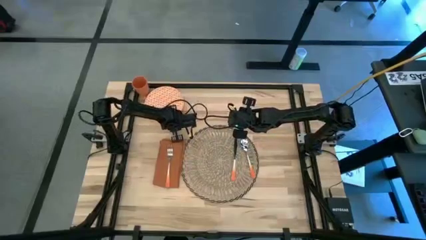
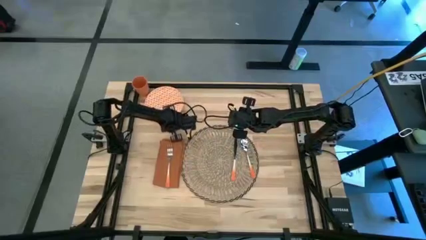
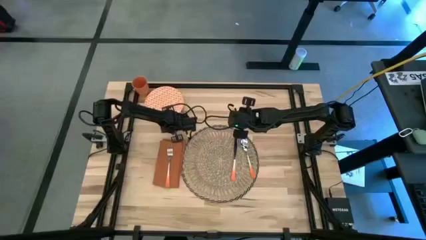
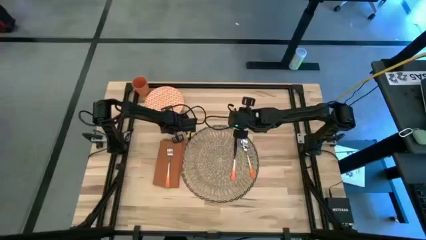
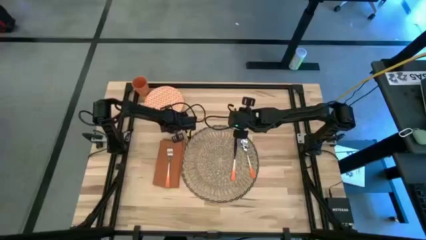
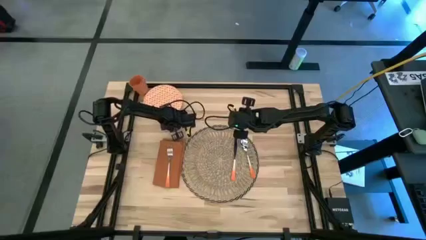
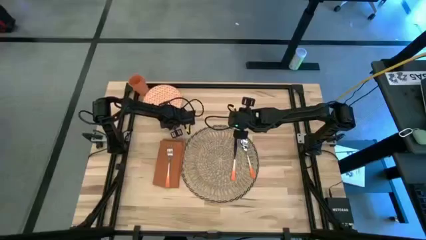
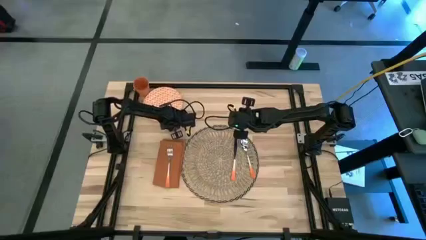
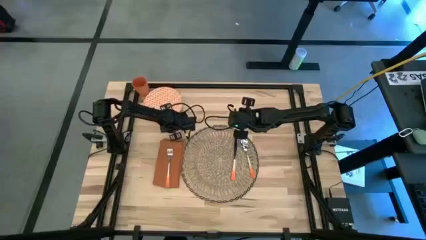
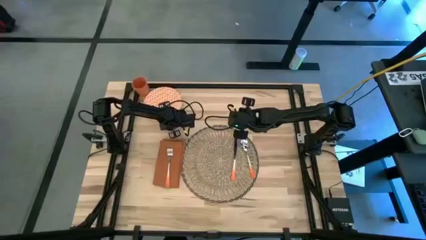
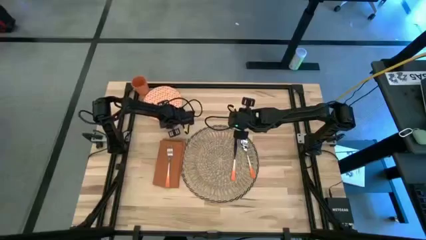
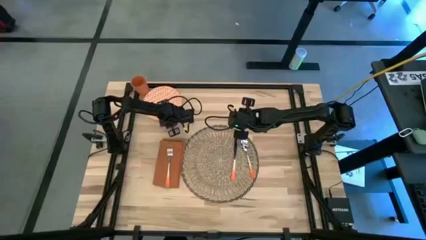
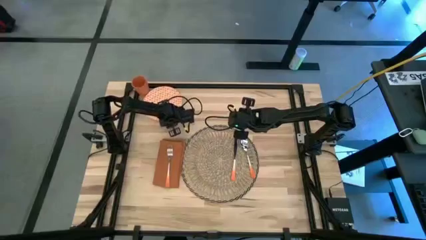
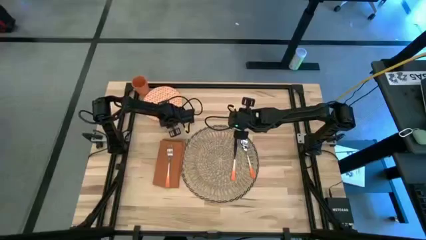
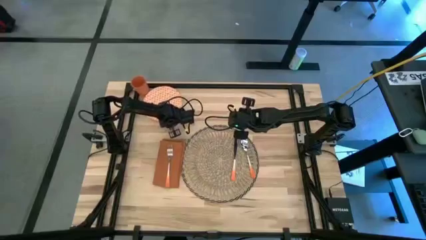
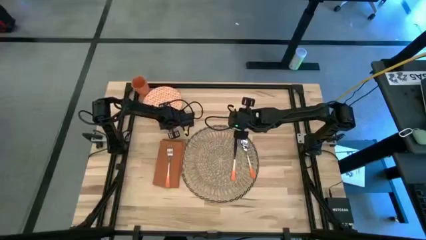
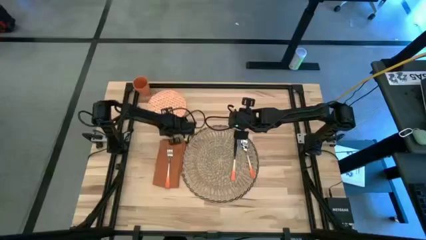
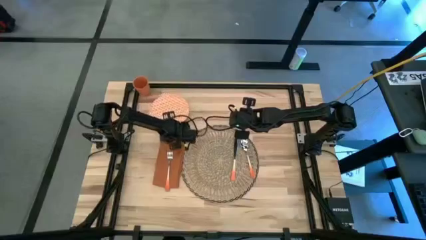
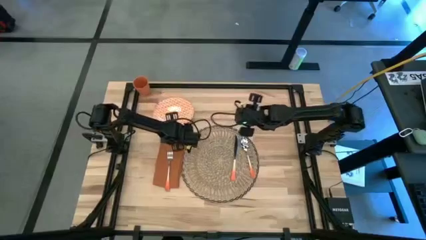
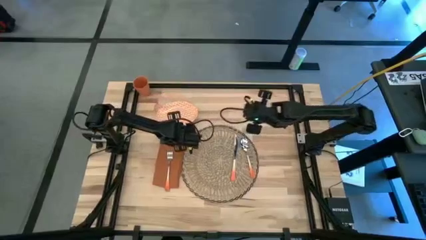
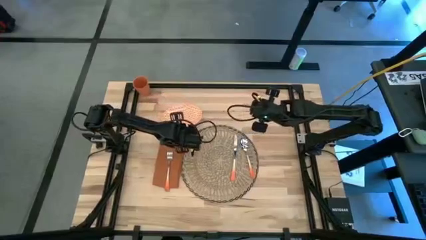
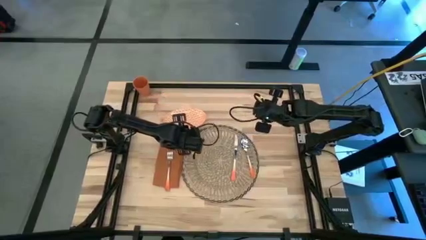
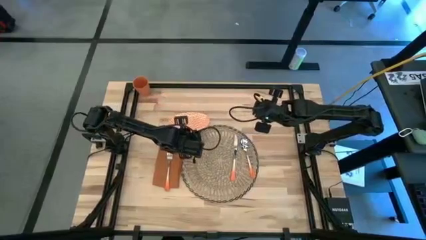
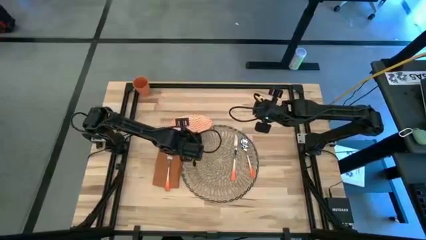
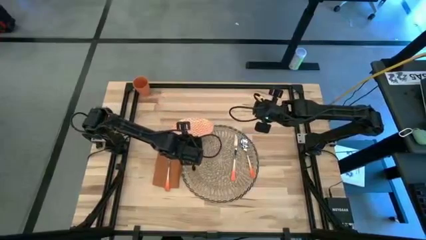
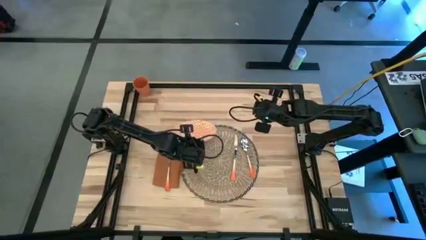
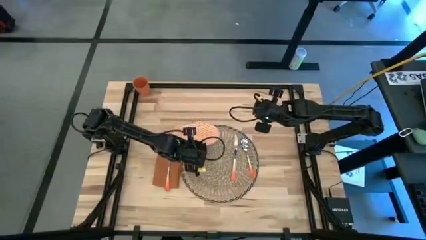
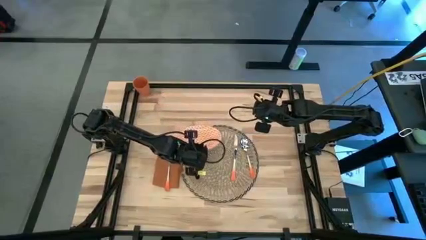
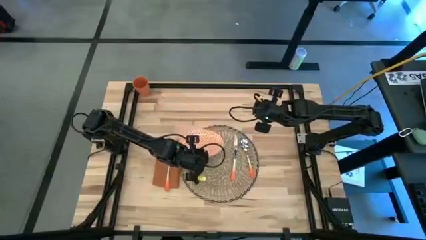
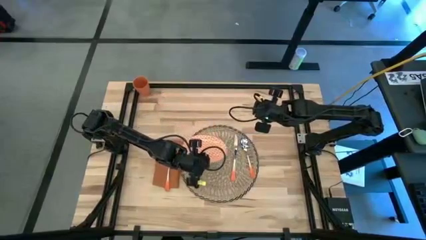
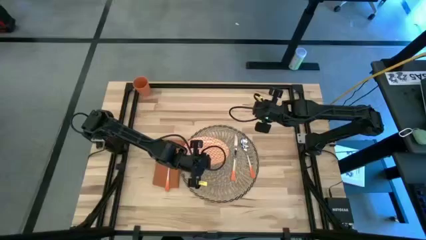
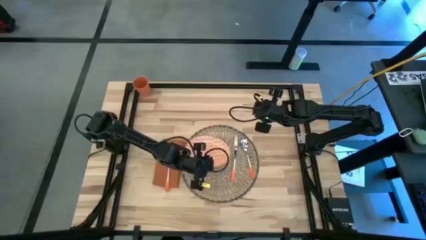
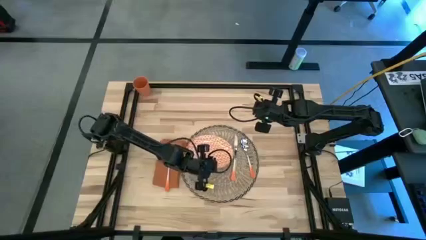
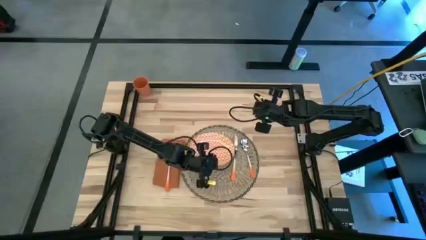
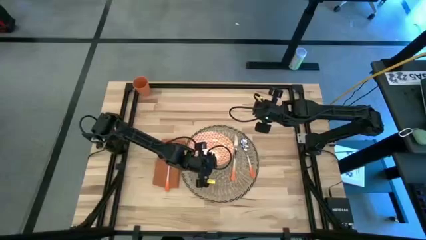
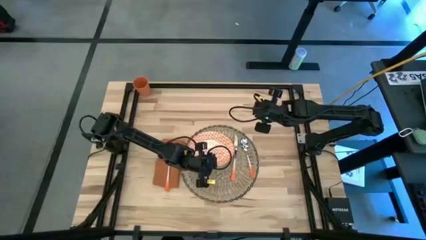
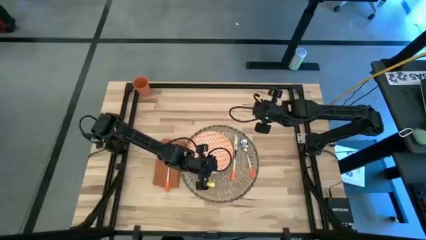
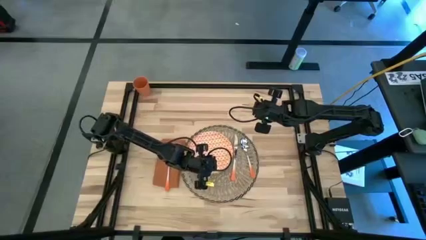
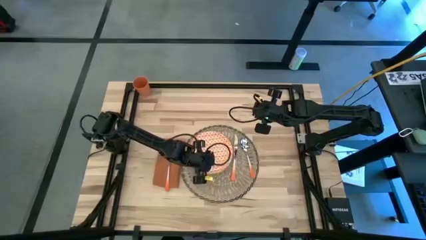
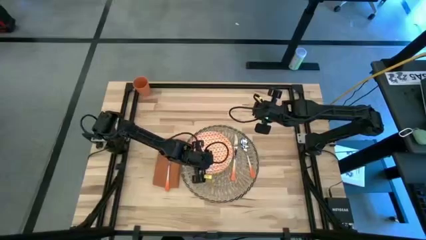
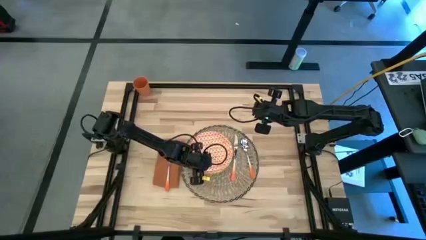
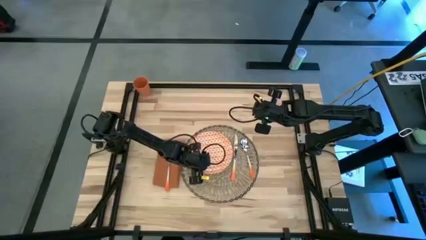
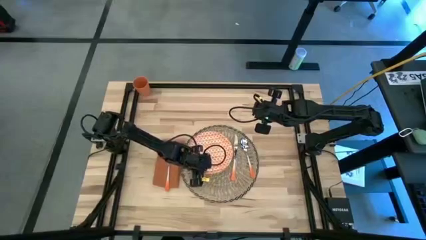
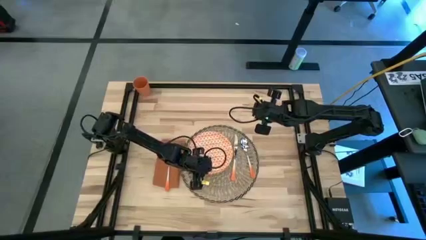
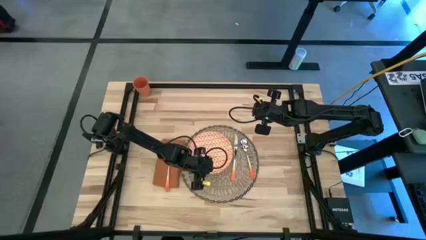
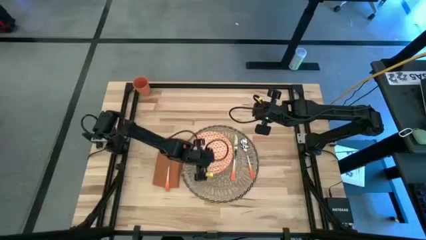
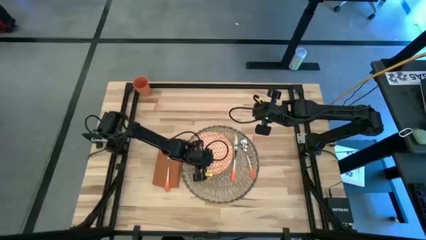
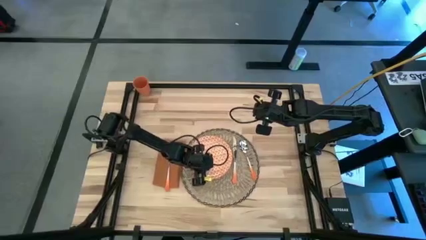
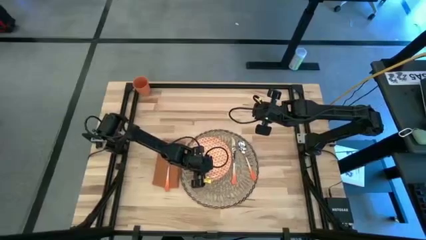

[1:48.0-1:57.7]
Task: Set table place
Put the orange plate to the left of the orange table knife on the brown table mat

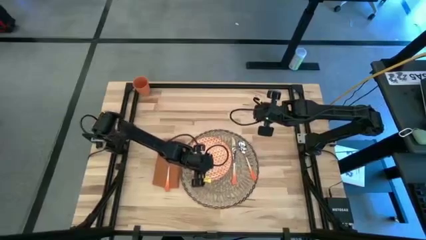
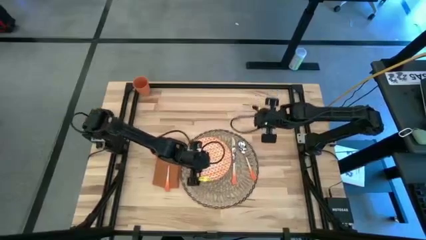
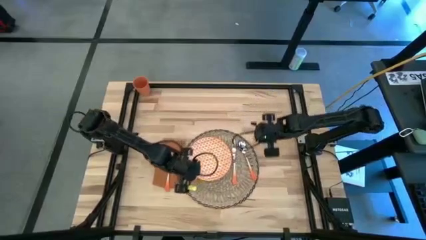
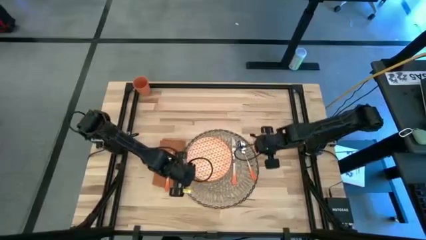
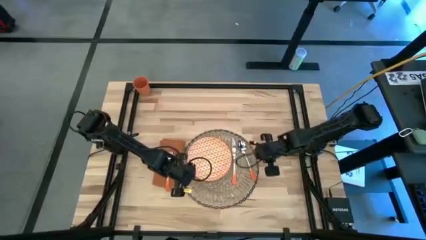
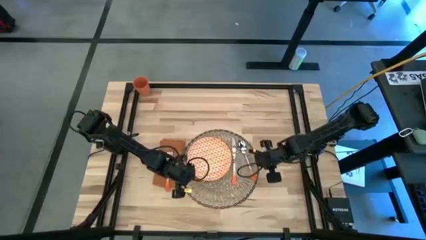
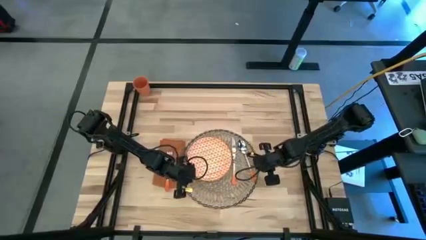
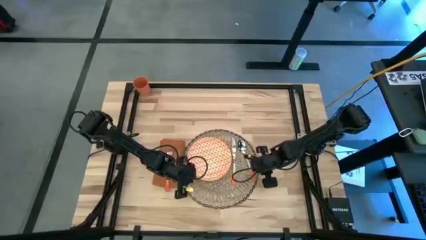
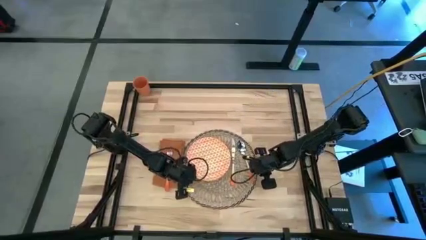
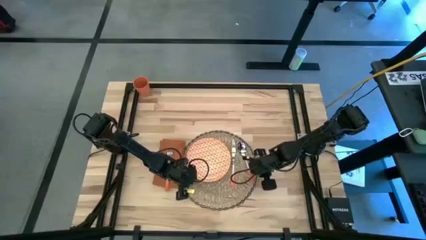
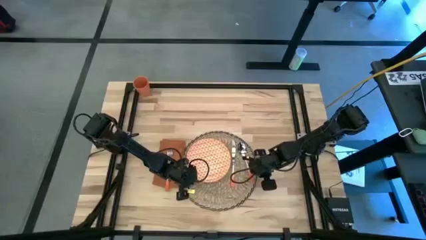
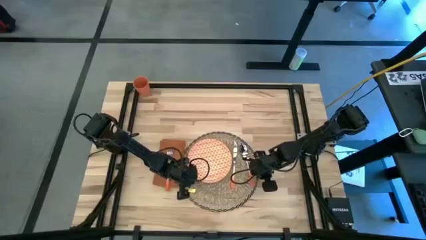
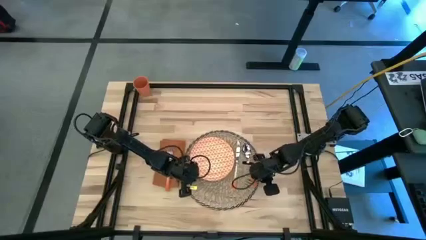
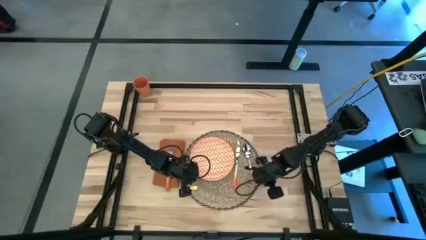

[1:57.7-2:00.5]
Adjust the brown table mat

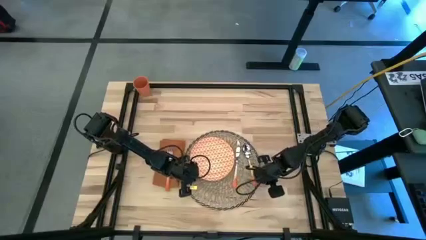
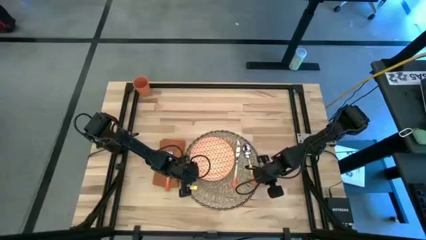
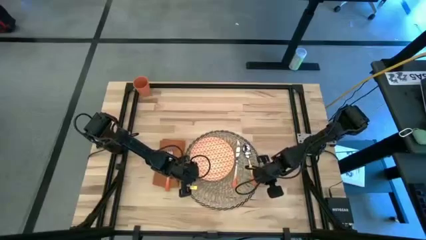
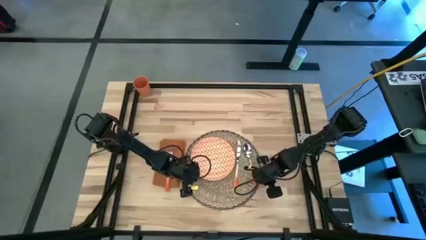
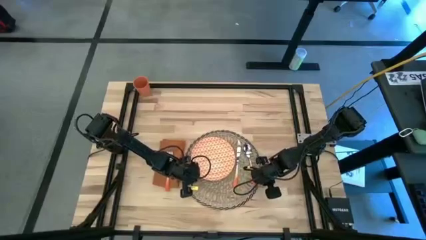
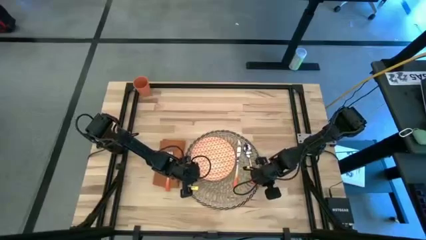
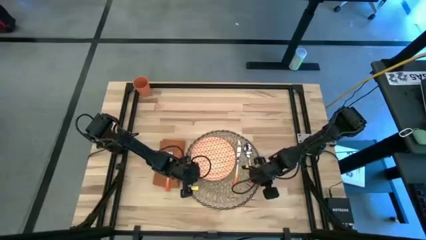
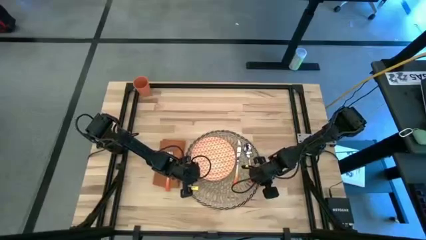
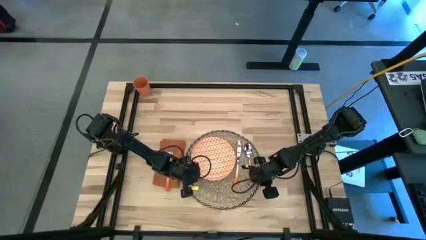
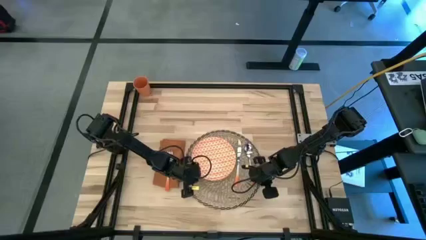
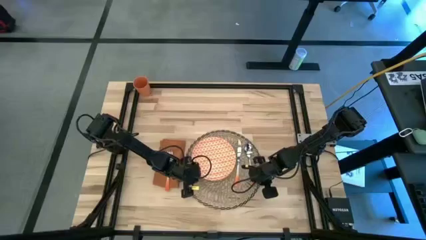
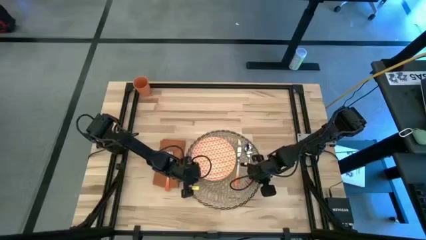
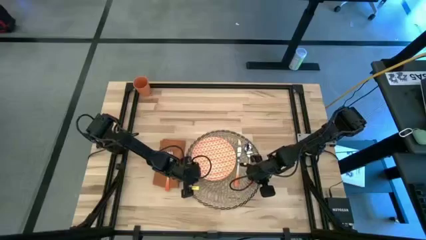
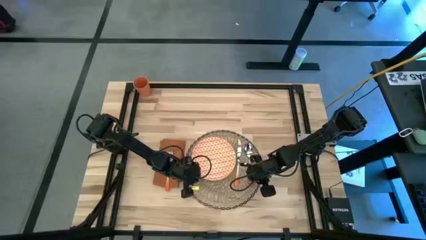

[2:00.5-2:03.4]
Adjust the orange spoon on the brown table mat

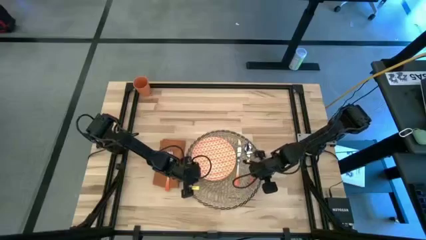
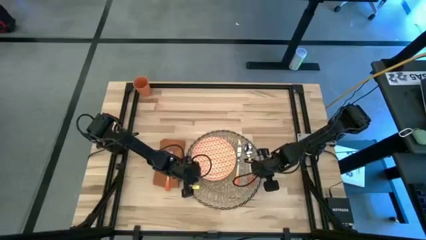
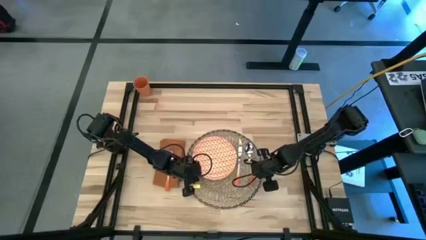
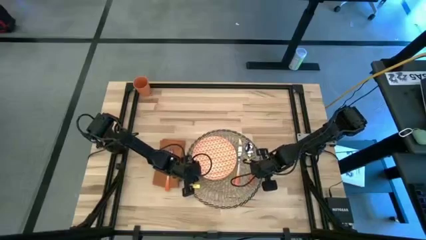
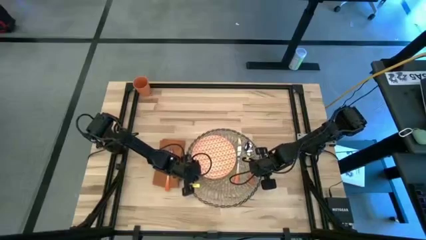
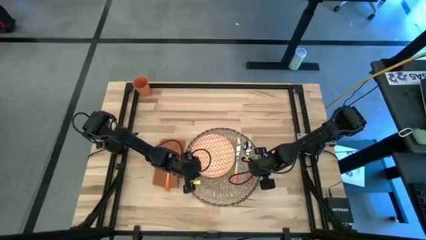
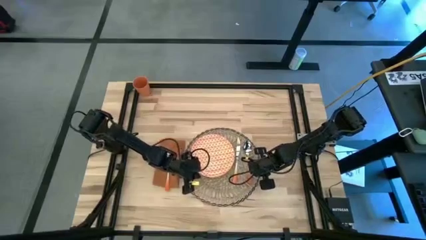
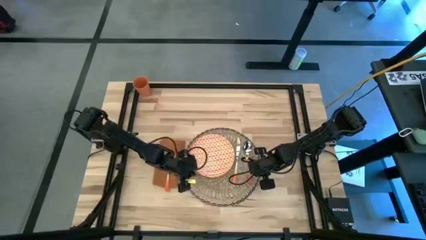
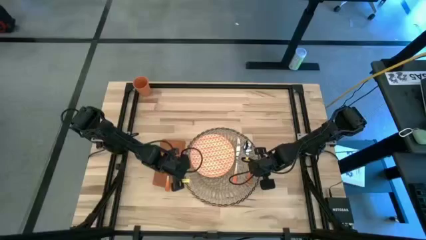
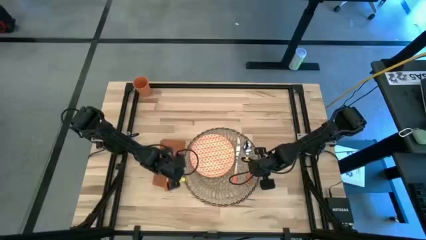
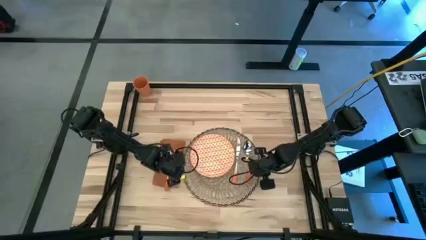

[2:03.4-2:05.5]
Adjust the brown table mat

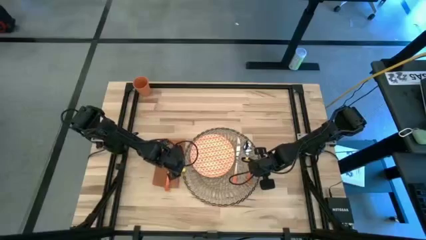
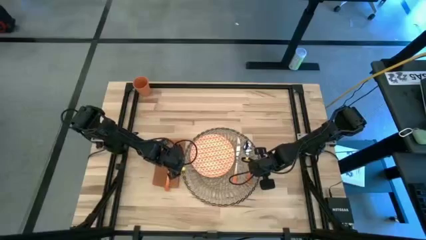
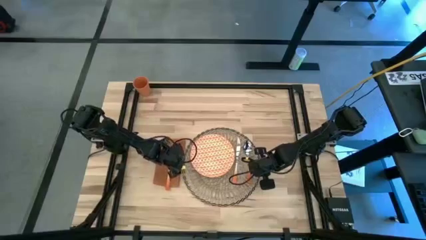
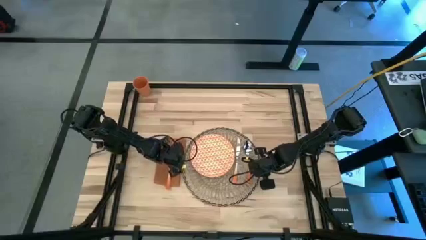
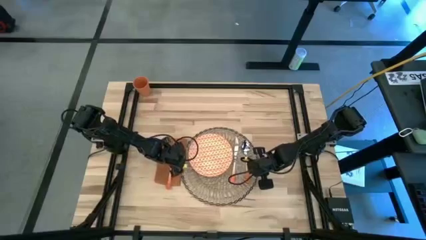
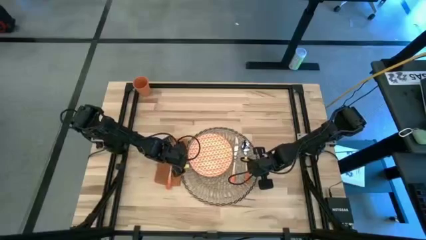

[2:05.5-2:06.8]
Adjust the orange table napkin
